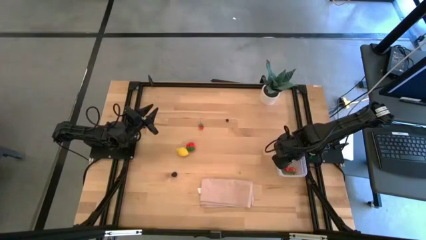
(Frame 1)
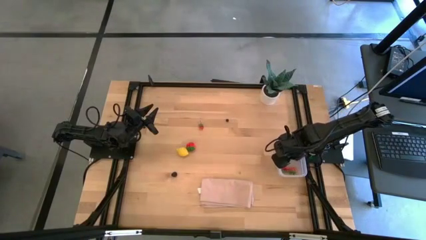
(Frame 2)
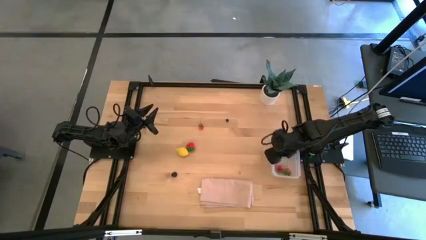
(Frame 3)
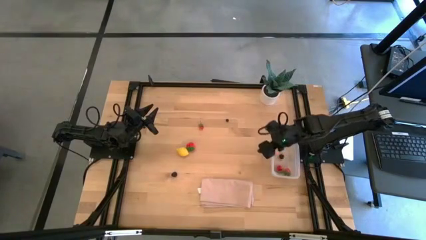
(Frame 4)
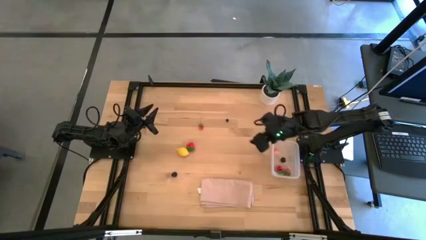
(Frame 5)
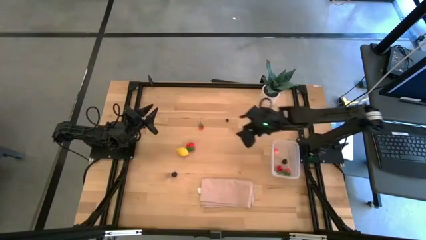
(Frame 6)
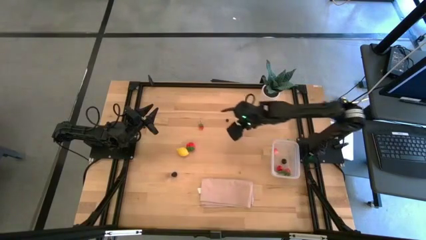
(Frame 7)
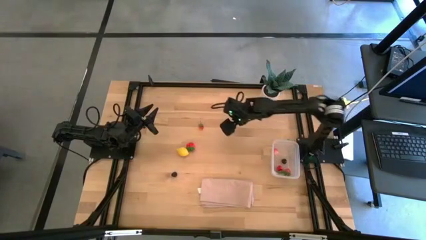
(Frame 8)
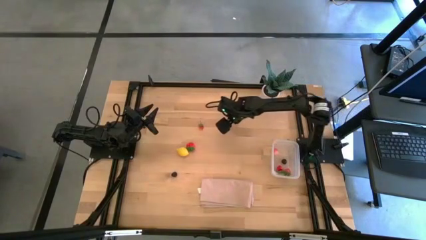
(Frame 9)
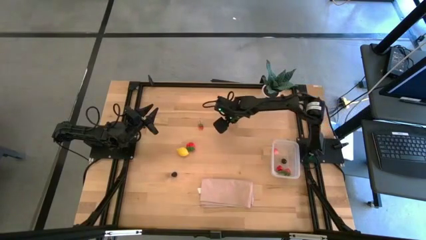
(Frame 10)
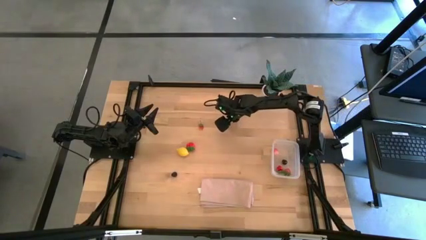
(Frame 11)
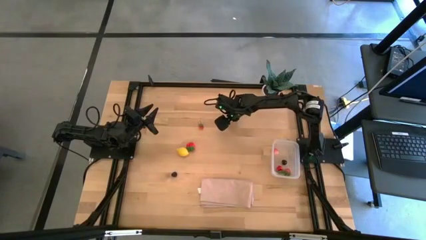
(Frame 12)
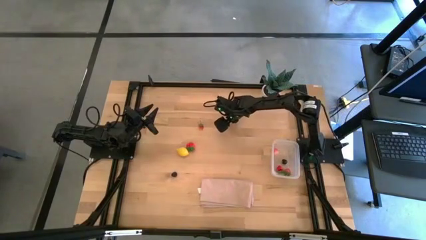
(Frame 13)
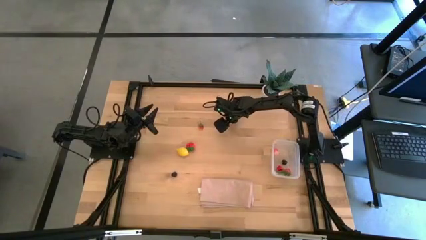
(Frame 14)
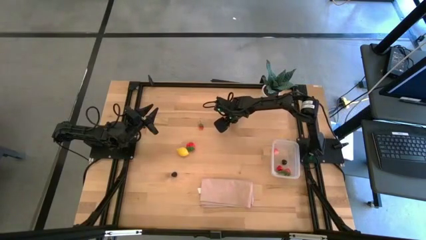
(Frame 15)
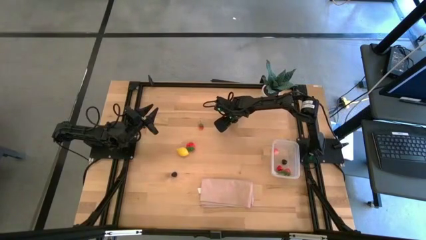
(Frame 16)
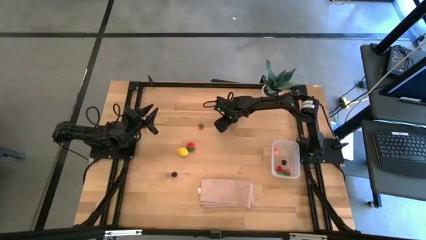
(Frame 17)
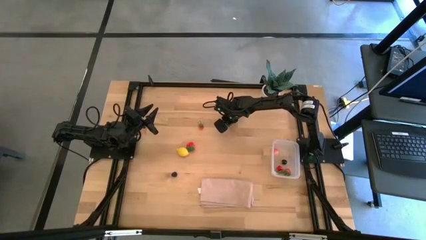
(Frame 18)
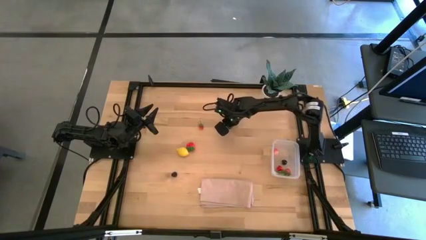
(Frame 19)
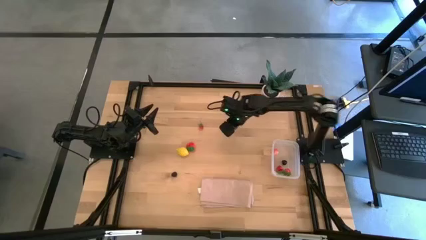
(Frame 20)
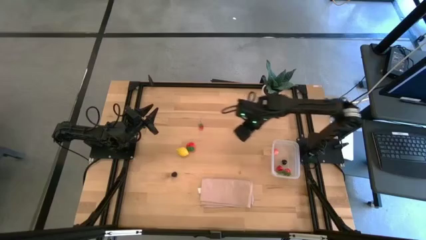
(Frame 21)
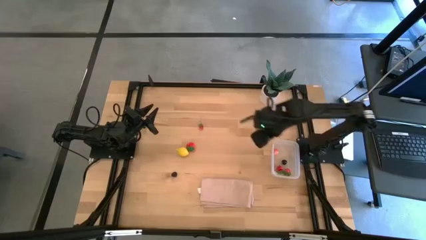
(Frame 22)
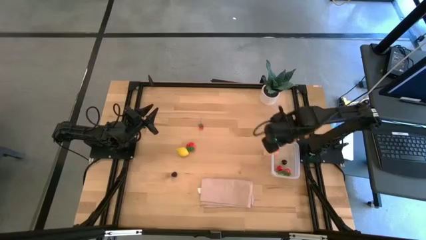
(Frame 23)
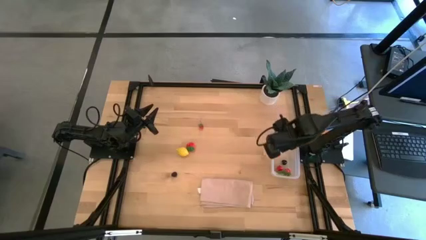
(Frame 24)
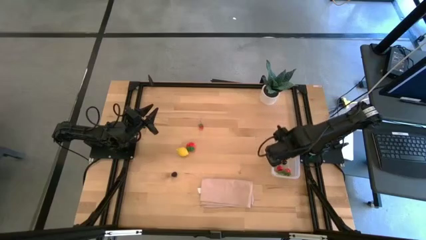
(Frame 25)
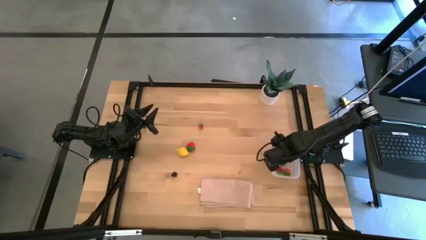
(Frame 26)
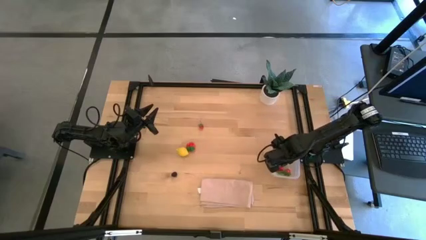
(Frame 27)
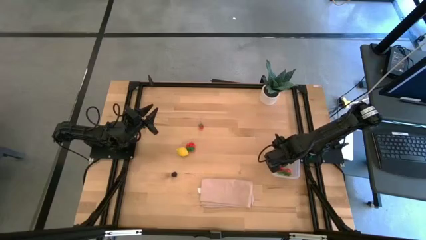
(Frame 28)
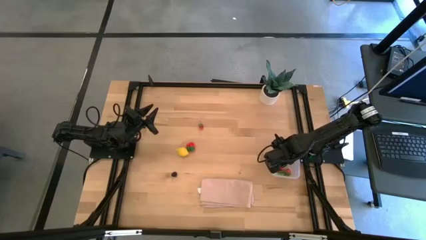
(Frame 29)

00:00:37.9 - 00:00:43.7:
Task: Pick and placing Produce into tupperware
Put the blueberry into the transparent bin

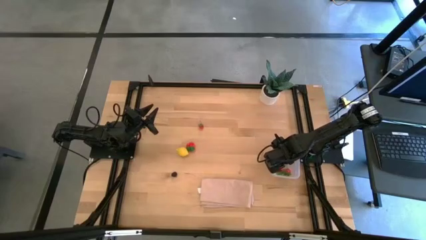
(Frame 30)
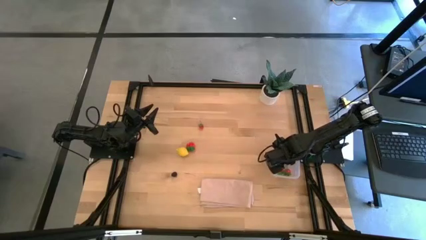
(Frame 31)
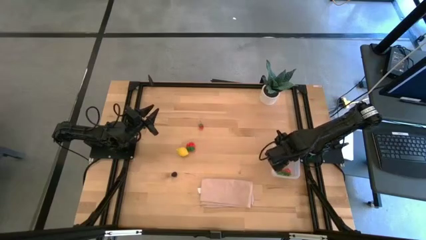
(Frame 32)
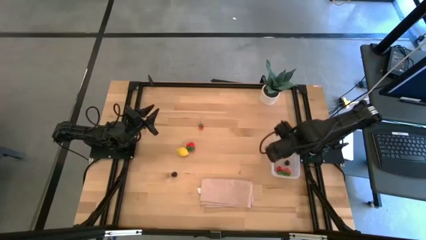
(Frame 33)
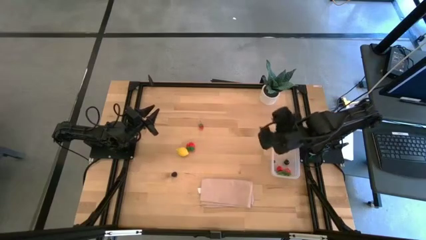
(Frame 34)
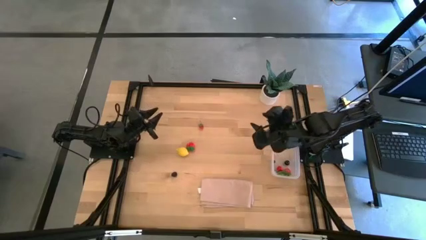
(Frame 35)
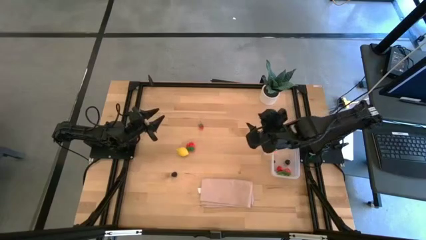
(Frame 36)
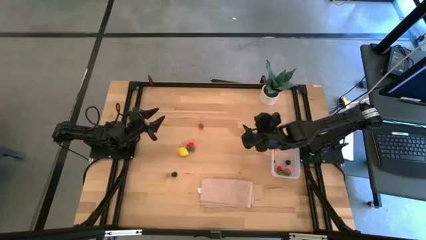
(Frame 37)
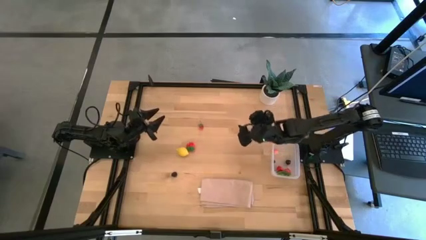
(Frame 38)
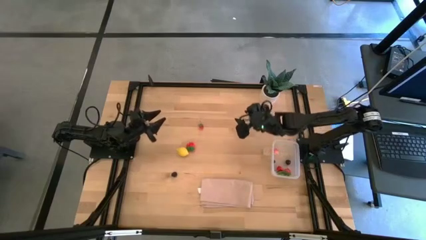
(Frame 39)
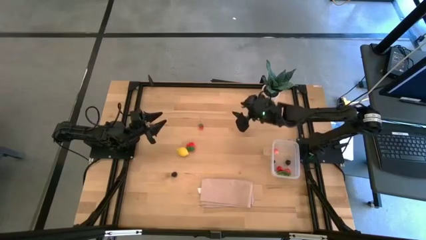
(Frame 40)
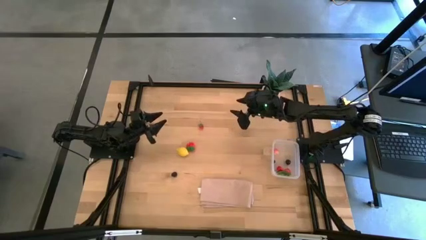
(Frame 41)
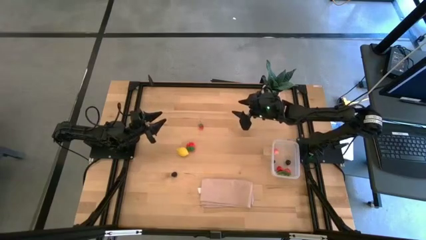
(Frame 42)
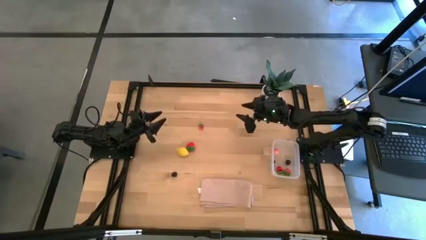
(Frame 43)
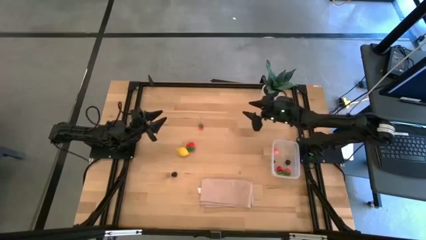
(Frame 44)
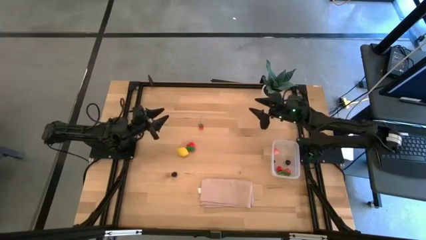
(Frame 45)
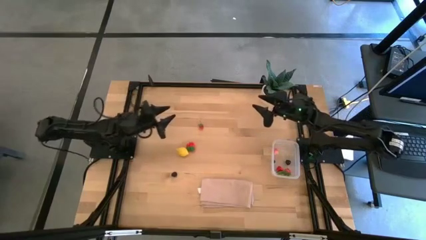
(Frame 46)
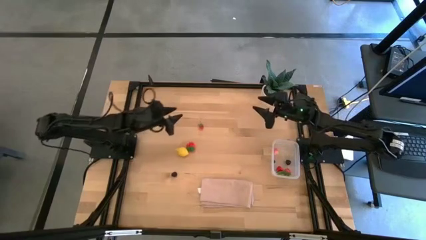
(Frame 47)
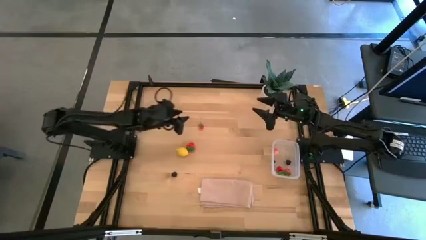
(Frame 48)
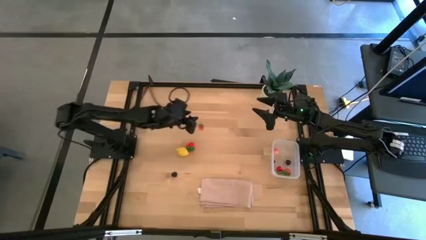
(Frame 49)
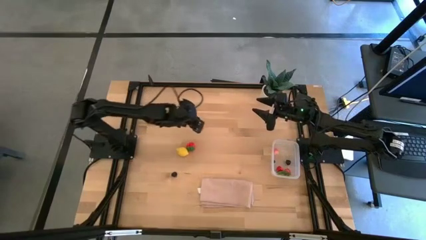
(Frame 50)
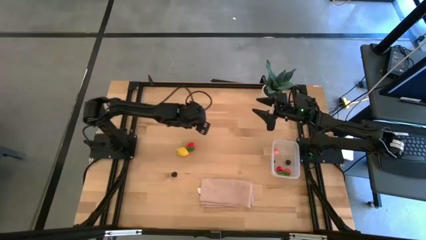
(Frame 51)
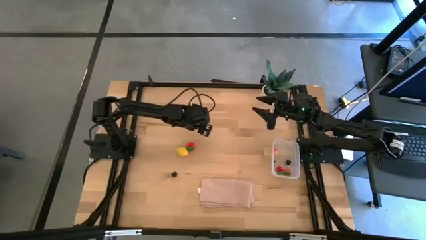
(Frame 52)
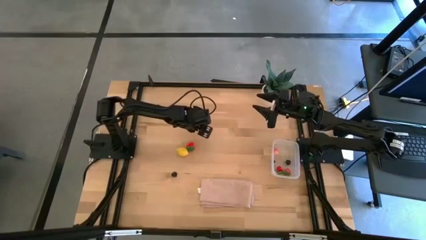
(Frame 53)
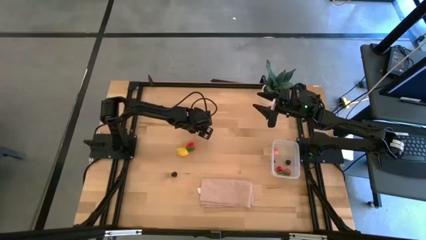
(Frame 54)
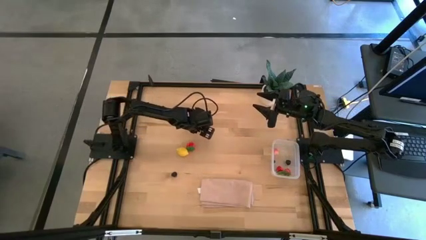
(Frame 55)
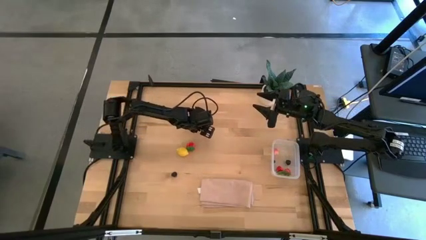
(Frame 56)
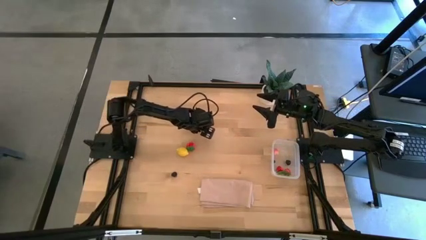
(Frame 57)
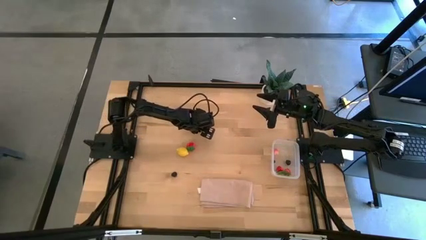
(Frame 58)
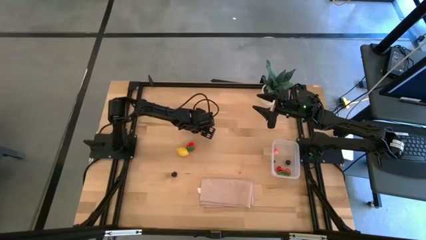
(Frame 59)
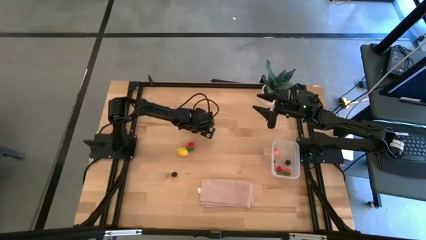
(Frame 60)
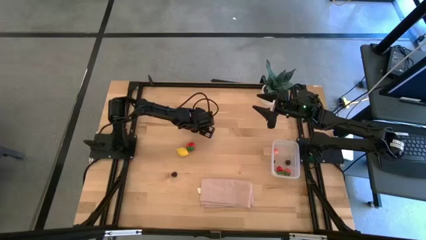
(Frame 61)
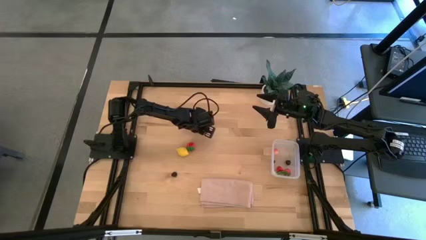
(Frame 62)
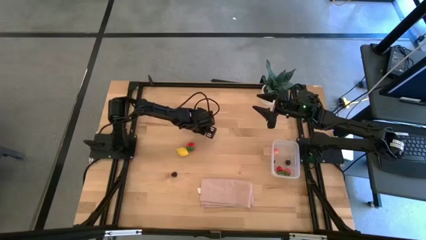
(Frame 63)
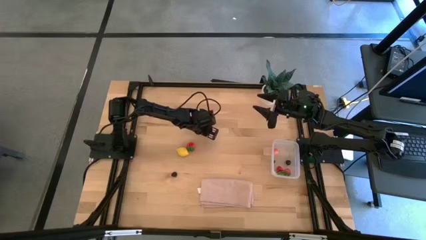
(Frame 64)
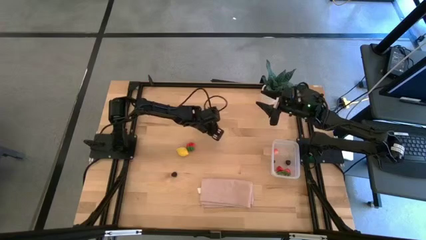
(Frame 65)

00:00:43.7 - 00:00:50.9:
Put the top red strawberry into the transparent bin

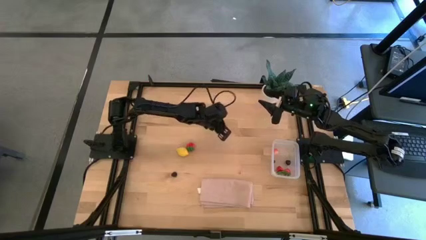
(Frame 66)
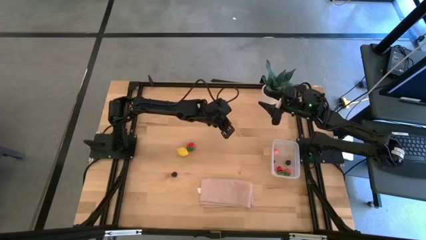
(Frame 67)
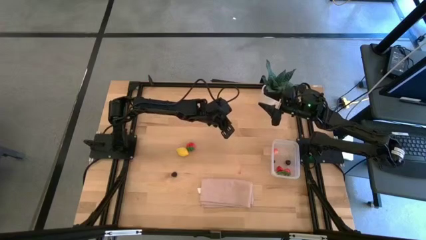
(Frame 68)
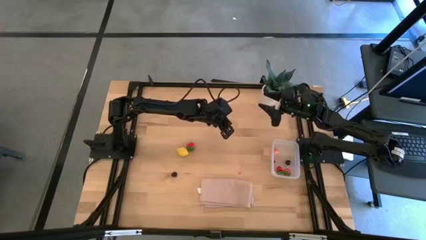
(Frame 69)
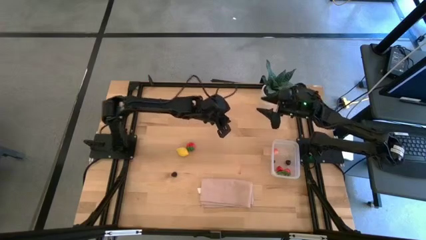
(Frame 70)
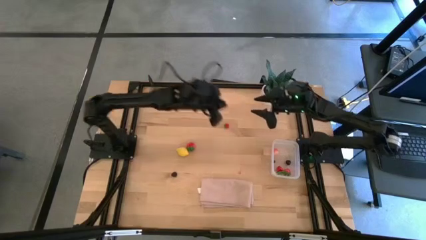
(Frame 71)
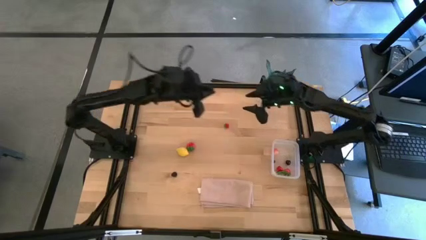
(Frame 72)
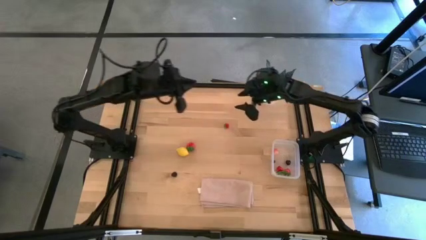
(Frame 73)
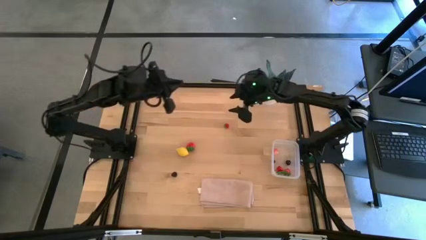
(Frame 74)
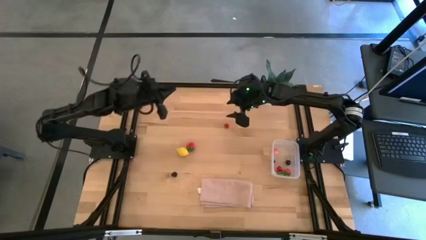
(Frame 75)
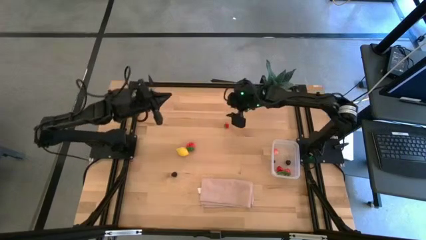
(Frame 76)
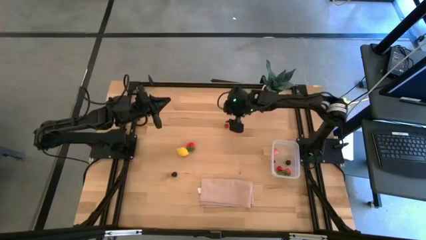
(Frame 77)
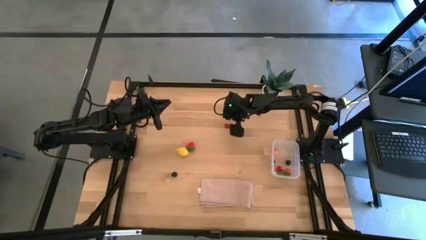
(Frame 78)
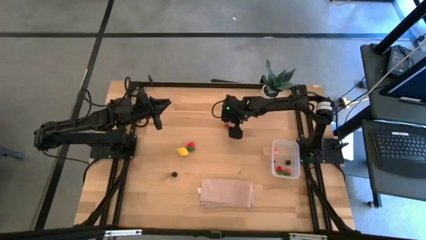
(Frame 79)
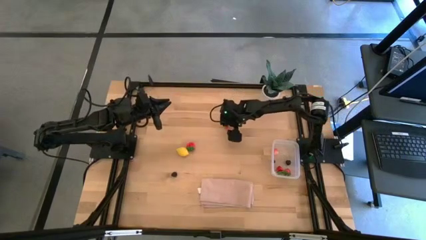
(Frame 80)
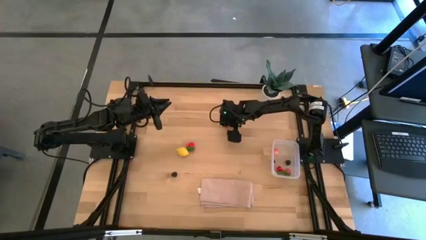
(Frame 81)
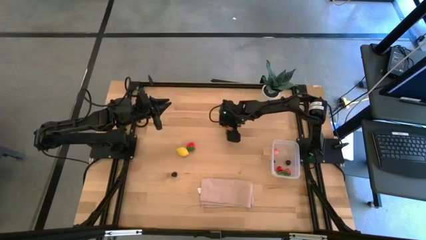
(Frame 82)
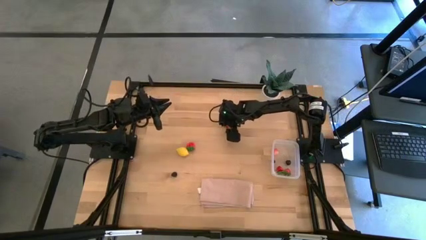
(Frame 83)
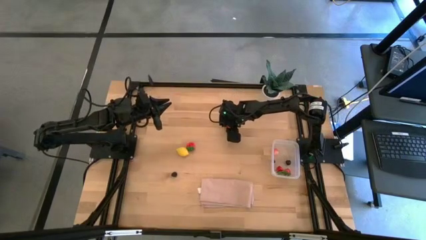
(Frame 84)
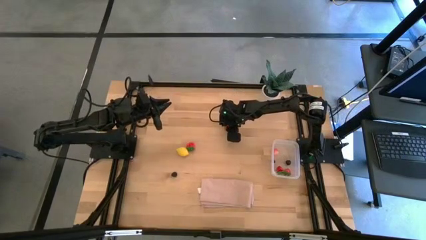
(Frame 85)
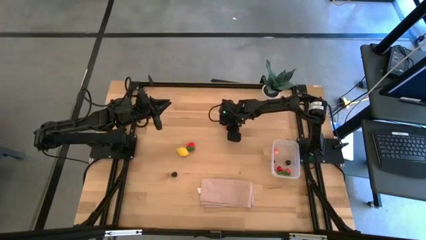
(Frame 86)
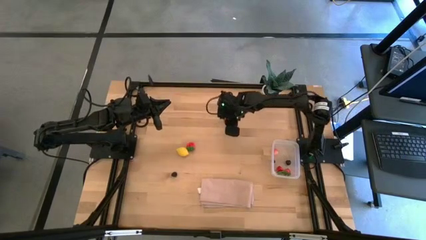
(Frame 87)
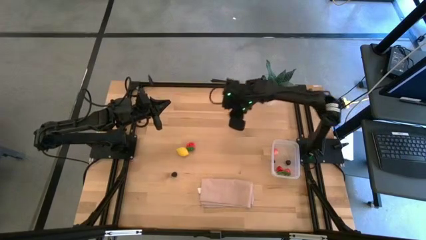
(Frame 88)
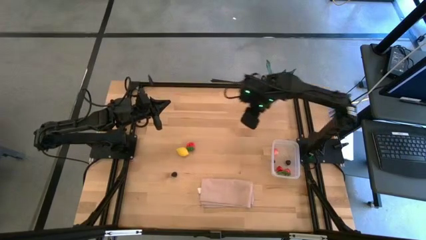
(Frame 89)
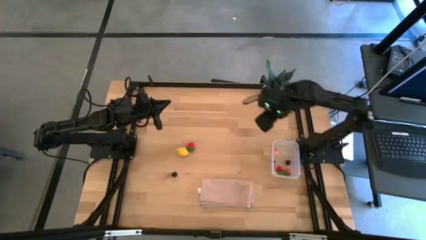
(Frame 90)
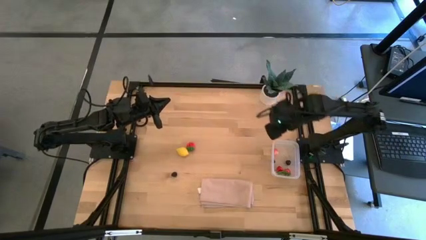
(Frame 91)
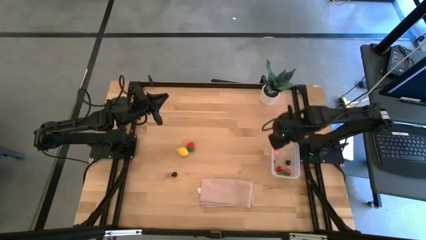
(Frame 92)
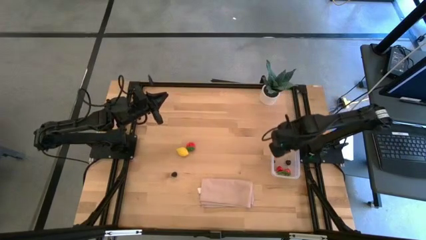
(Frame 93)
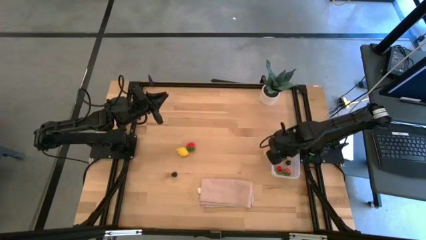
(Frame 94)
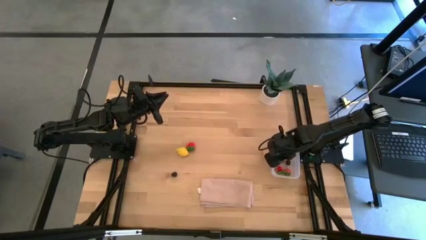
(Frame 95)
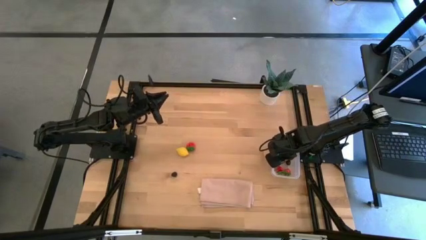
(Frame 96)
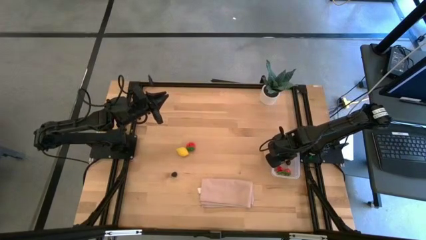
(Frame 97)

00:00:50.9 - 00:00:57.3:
Put the top red strawberry into the transparent bin
